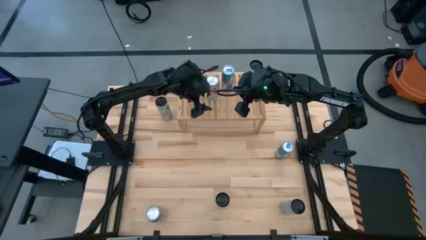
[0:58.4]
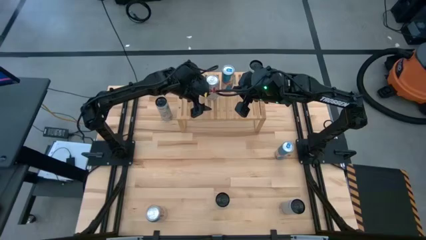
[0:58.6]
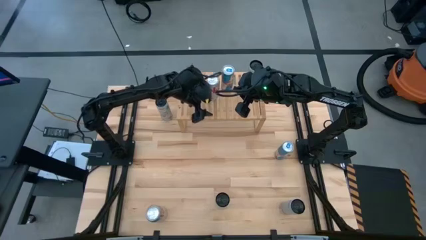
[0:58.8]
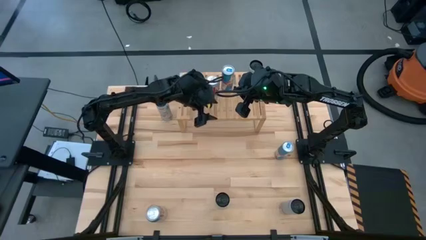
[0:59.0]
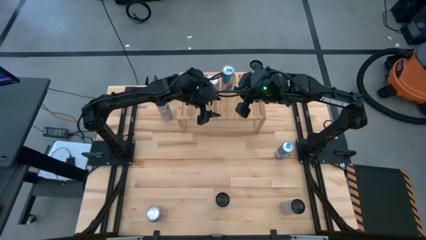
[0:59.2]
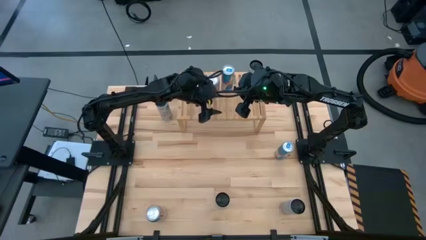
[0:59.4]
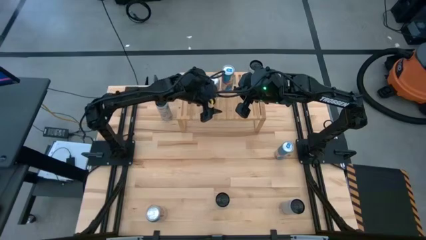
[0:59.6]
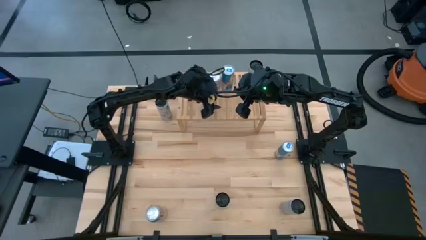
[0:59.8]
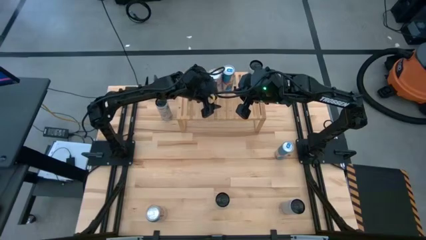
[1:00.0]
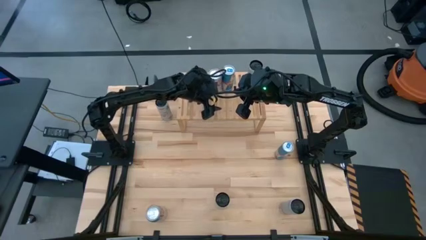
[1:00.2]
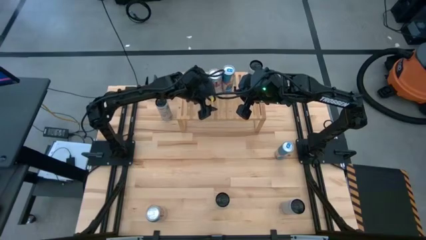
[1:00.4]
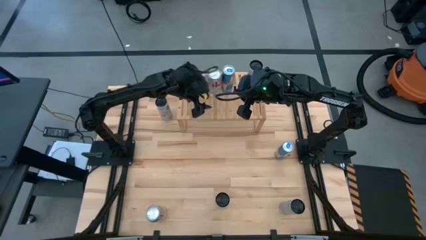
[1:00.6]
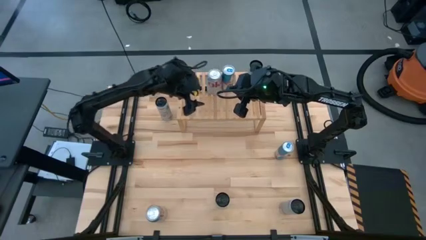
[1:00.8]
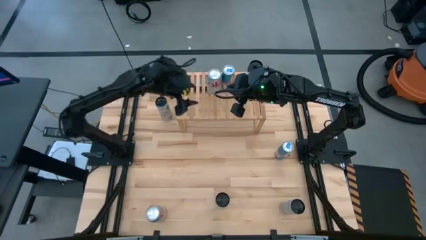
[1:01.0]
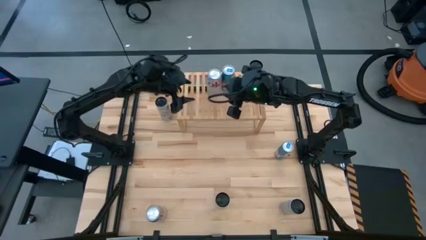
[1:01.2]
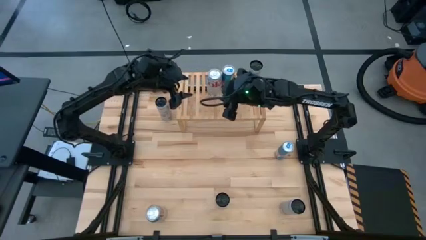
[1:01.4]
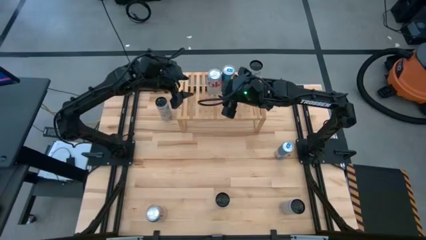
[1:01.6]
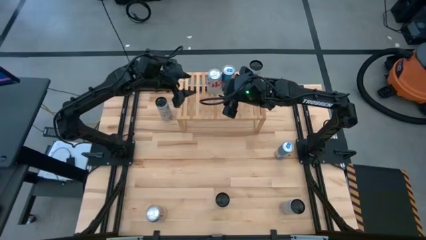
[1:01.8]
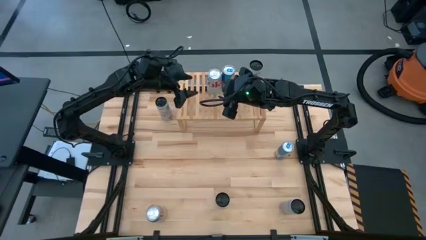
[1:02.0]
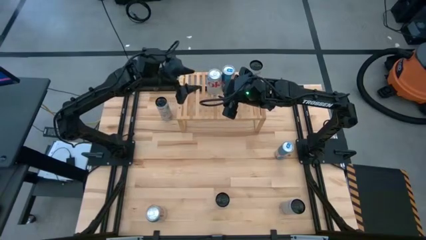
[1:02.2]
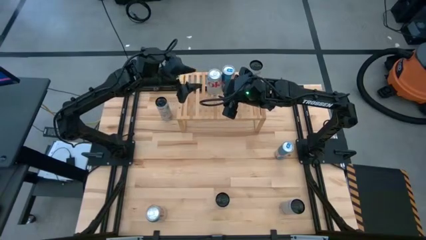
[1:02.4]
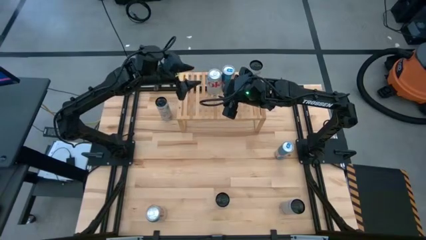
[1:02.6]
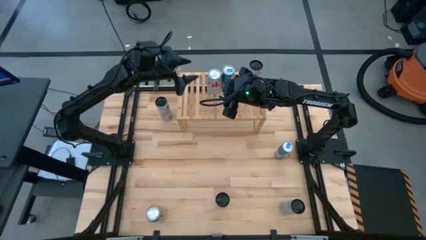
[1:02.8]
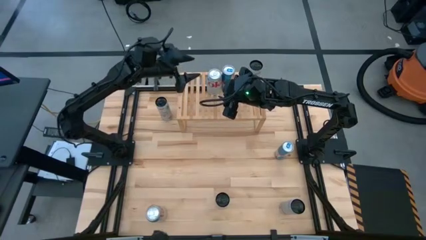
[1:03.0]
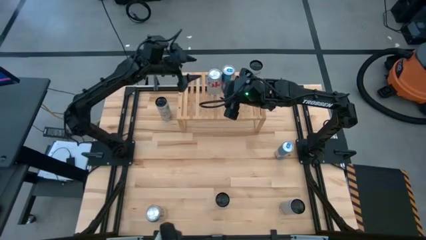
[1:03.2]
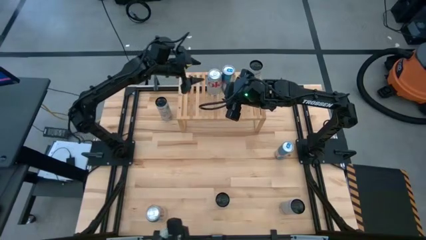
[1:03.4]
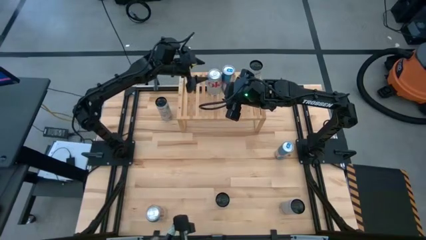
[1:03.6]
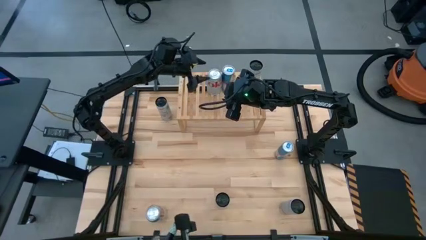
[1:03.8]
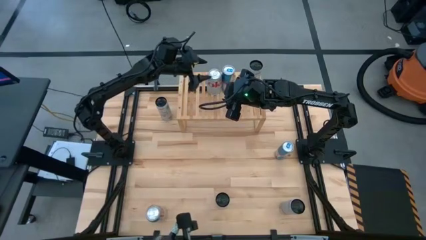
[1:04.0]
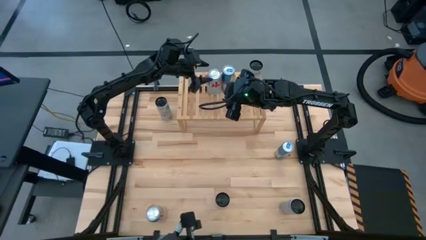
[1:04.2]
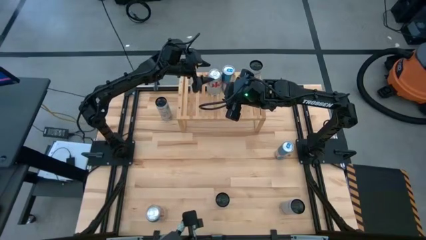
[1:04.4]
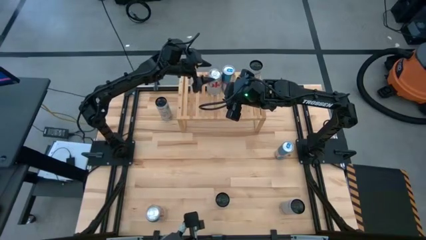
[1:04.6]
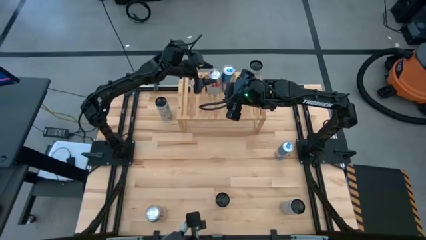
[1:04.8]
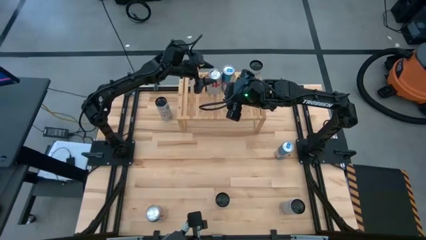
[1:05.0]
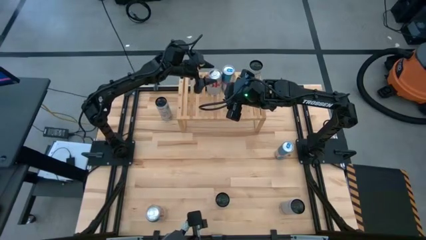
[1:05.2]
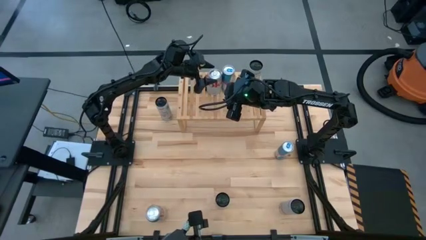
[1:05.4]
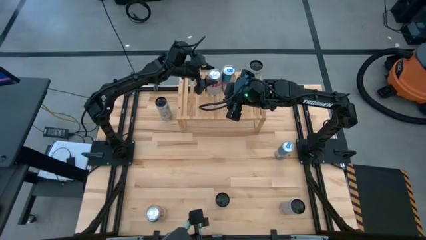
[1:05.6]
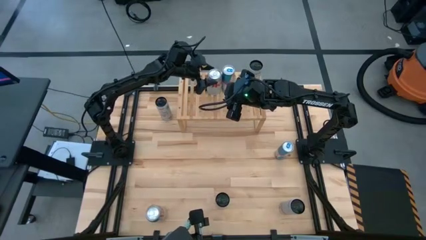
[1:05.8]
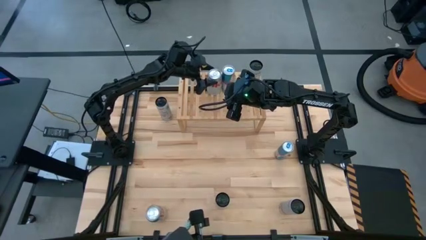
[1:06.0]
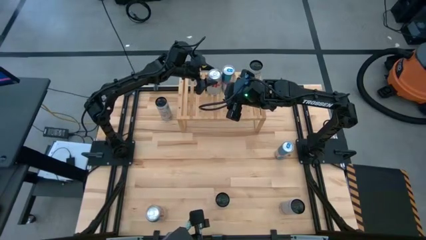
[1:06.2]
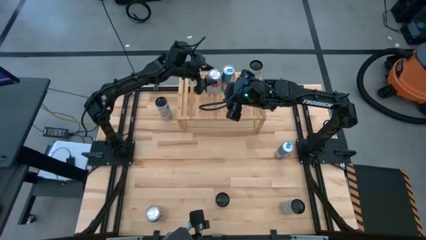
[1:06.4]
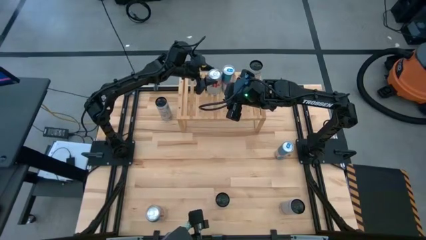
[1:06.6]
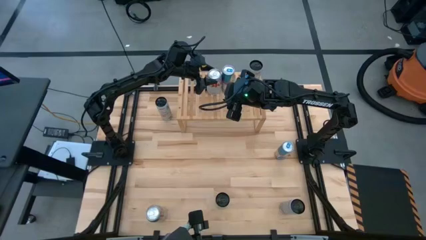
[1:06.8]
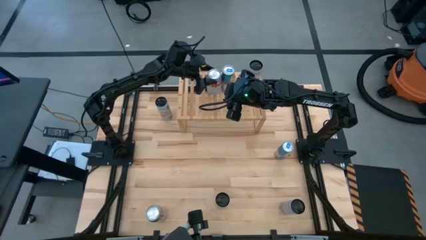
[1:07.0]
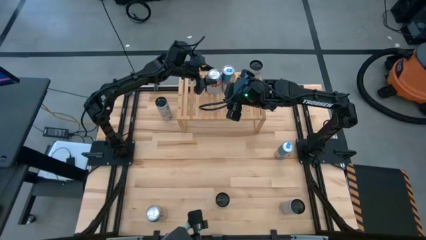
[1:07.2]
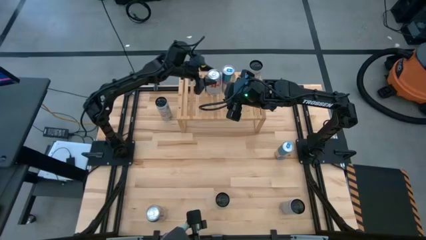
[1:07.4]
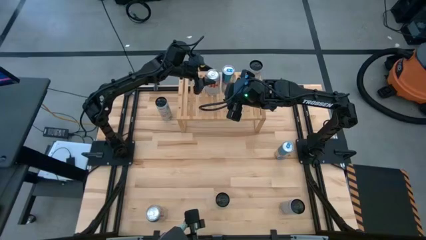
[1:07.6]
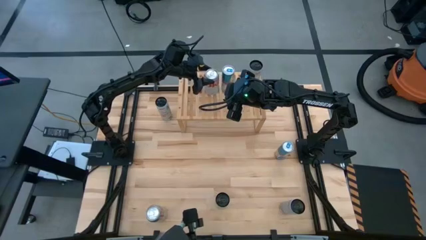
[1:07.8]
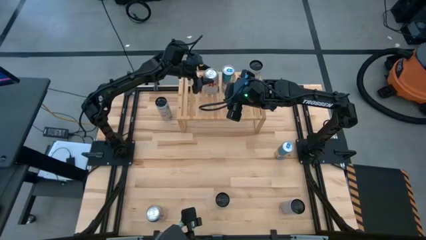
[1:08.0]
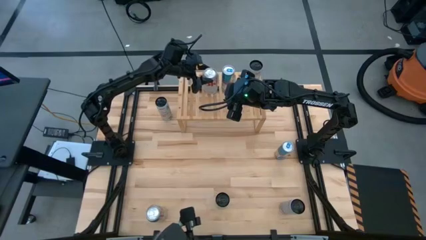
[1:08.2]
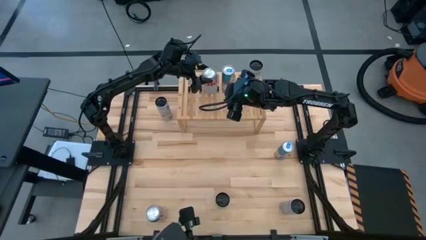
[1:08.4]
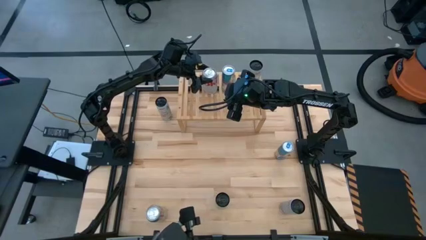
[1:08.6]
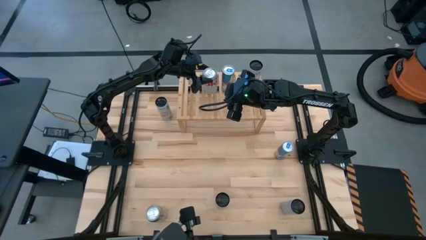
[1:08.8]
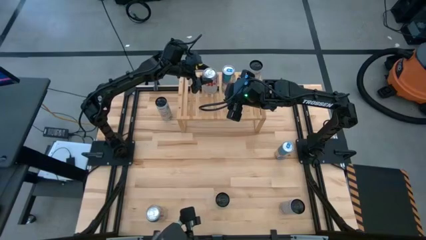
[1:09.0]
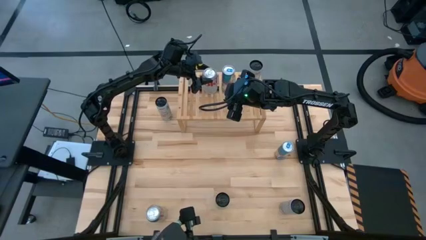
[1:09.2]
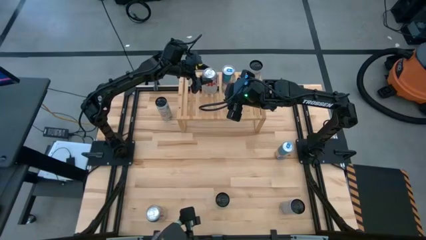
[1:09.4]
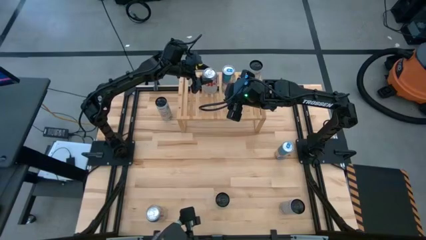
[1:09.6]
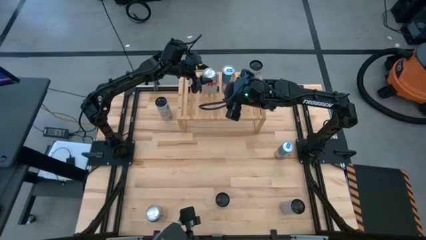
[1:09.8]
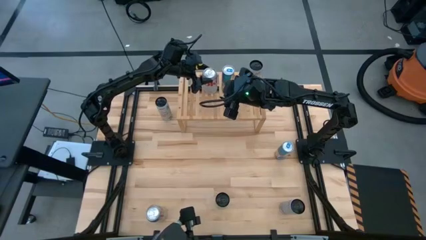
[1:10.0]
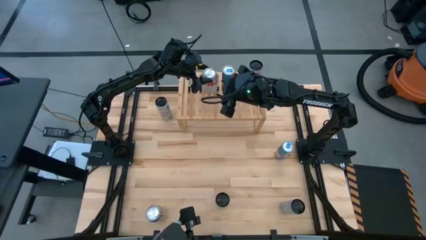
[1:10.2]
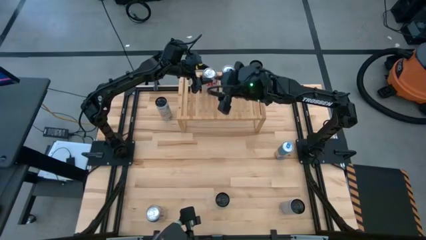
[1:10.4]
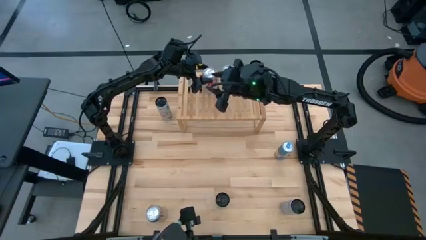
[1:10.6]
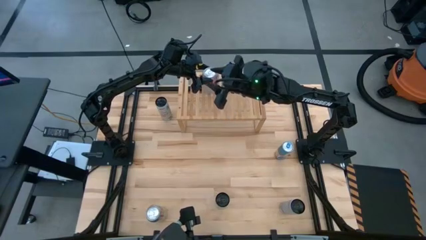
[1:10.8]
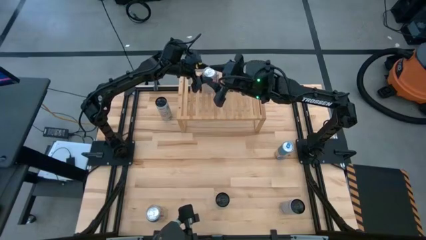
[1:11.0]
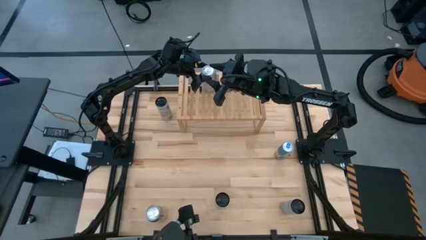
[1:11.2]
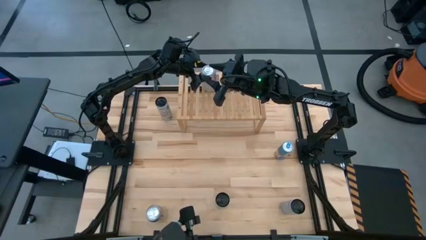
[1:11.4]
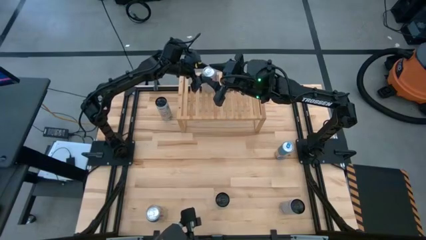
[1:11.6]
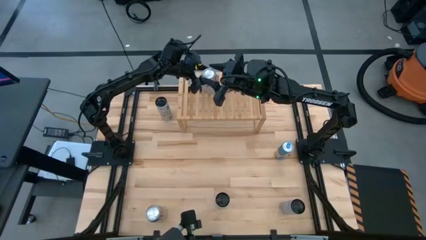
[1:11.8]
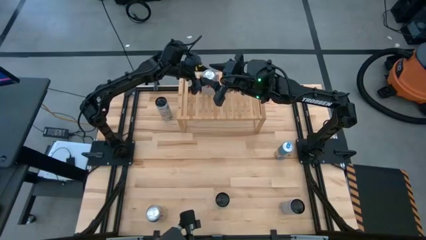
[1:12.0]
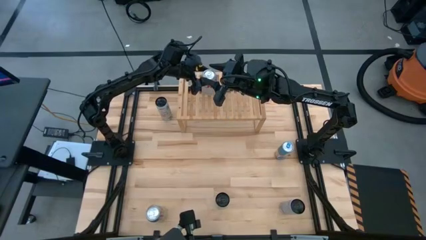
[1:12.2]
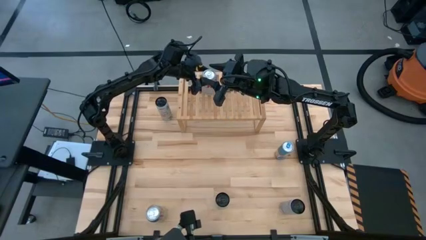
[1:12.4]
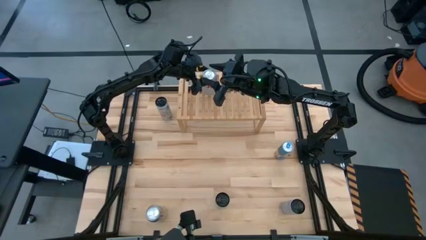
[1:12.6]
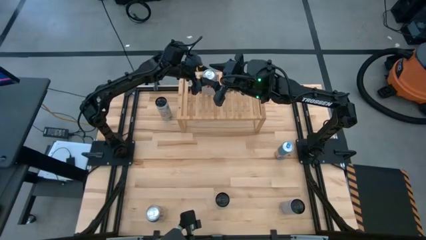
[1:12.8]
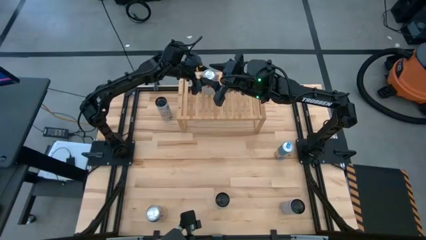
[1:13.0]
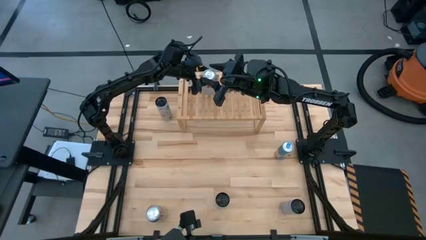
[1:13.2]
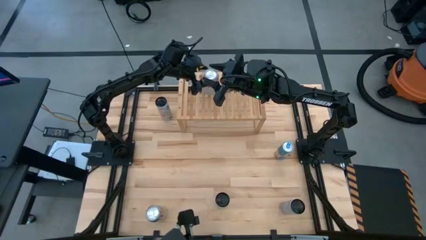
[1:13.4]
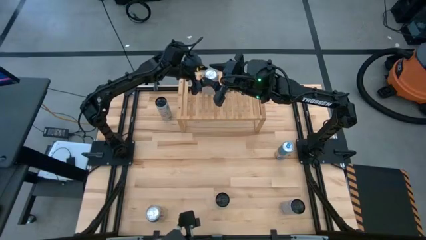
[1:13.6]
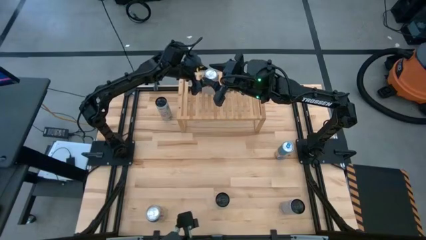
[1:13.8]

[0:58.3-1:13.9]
Task: Place canned beverage on shelf
Put the right silver soda can on the shelf
